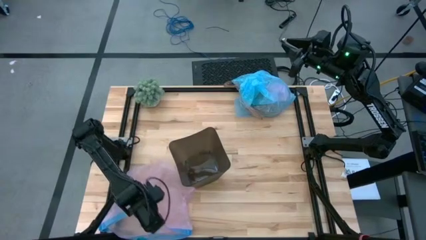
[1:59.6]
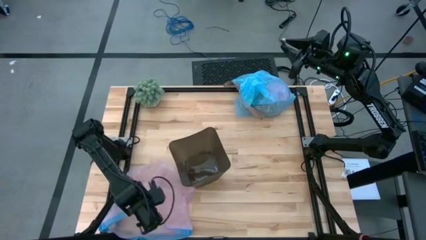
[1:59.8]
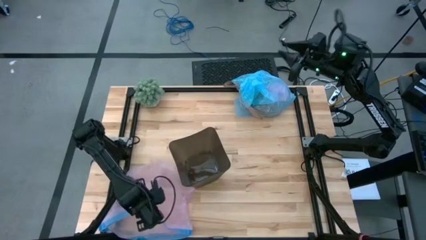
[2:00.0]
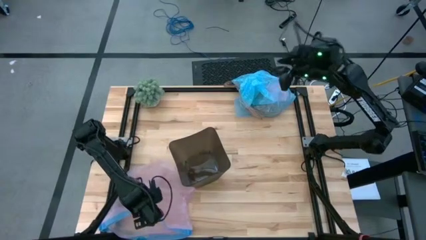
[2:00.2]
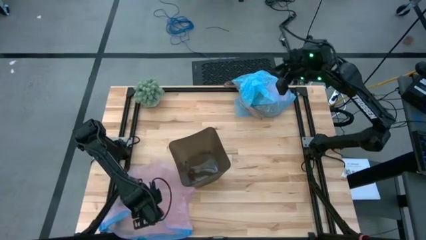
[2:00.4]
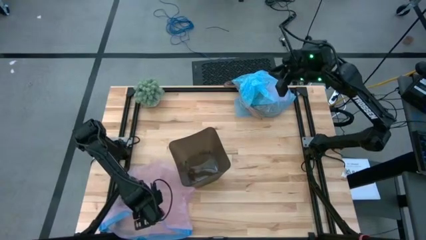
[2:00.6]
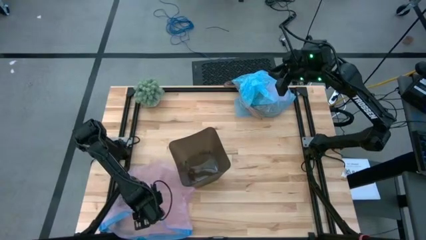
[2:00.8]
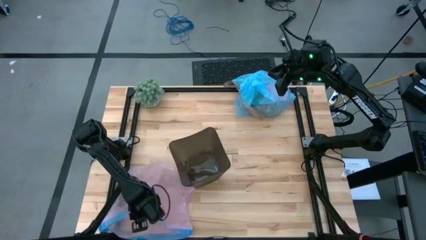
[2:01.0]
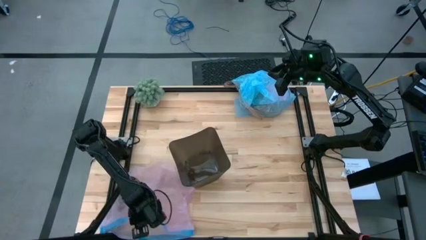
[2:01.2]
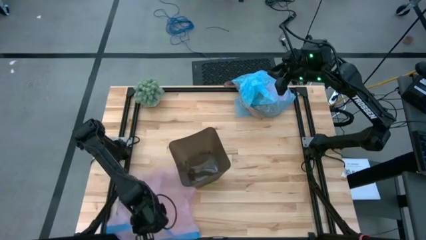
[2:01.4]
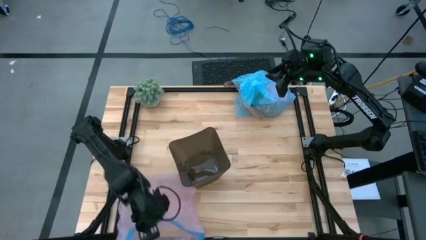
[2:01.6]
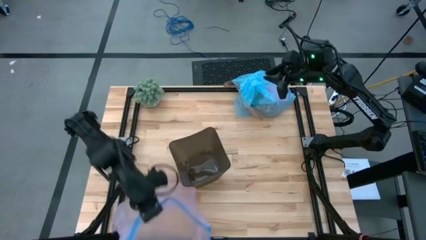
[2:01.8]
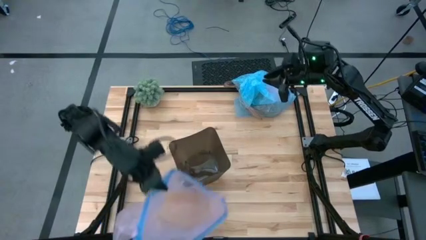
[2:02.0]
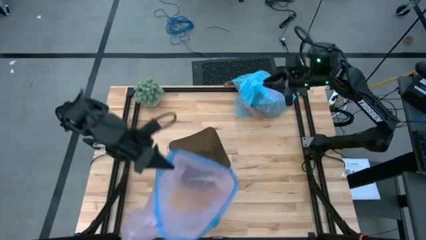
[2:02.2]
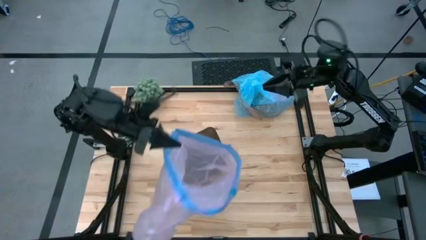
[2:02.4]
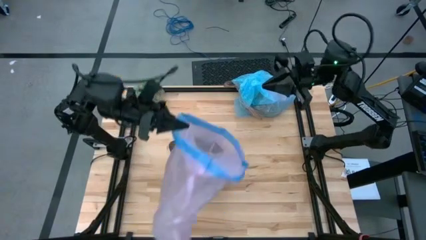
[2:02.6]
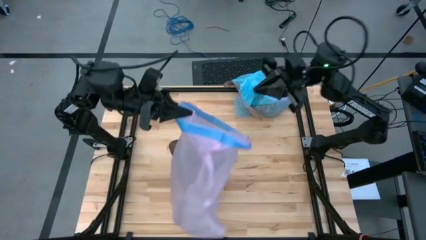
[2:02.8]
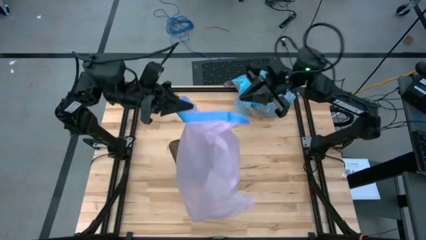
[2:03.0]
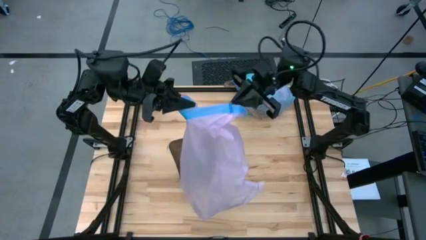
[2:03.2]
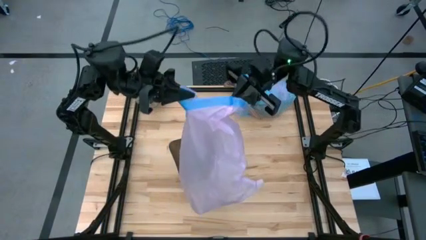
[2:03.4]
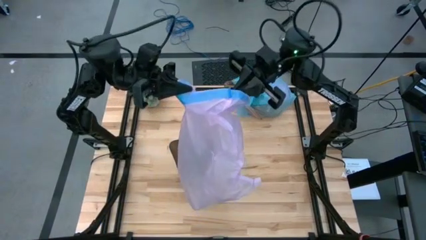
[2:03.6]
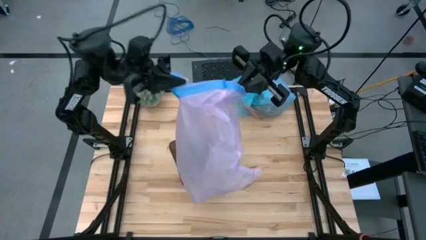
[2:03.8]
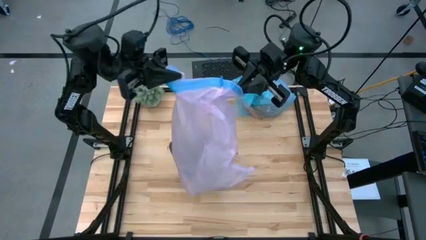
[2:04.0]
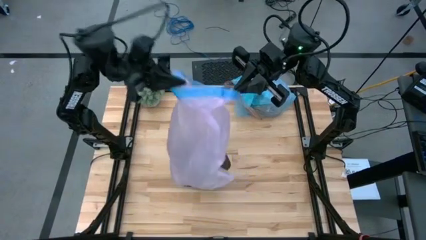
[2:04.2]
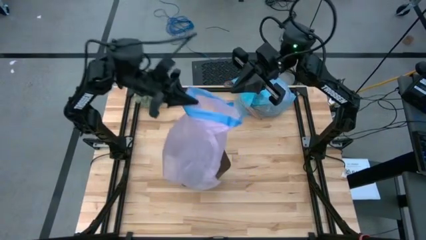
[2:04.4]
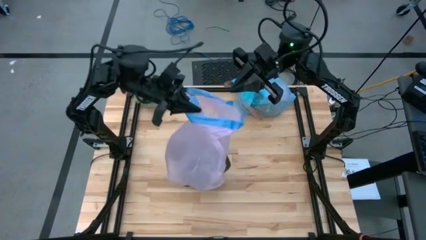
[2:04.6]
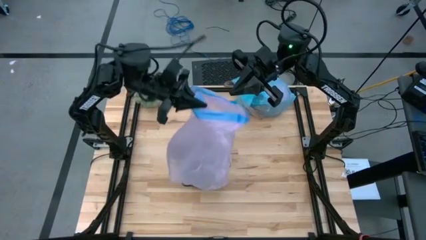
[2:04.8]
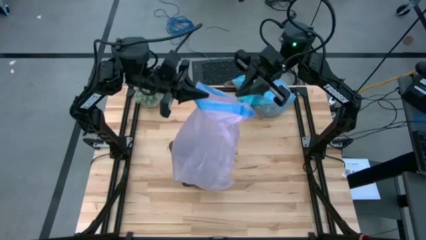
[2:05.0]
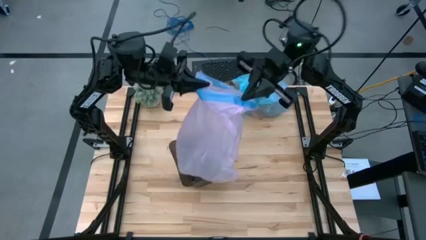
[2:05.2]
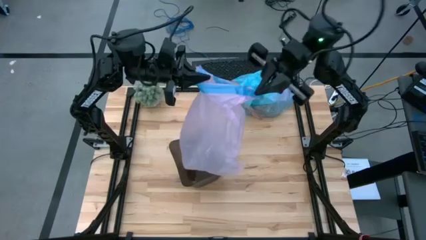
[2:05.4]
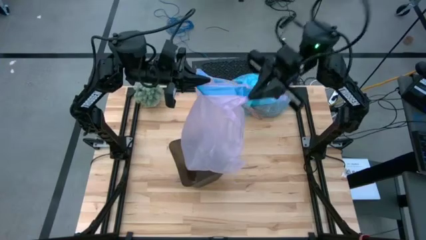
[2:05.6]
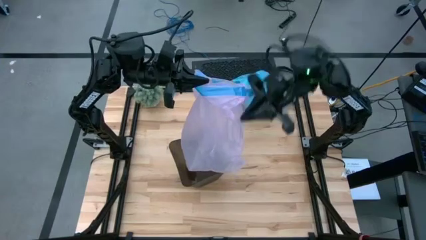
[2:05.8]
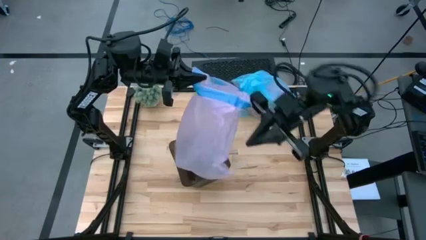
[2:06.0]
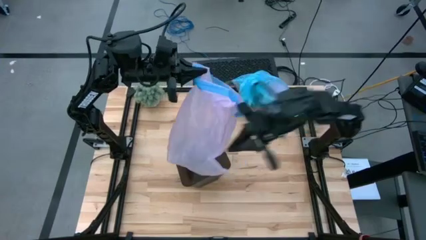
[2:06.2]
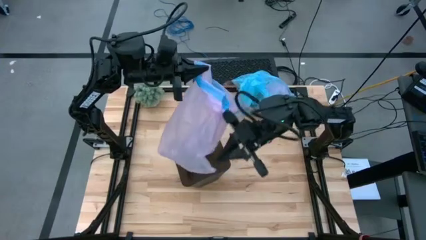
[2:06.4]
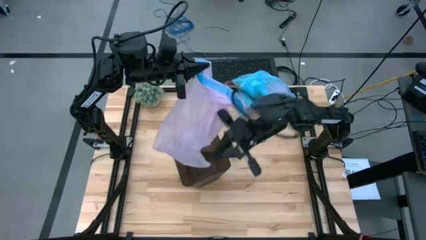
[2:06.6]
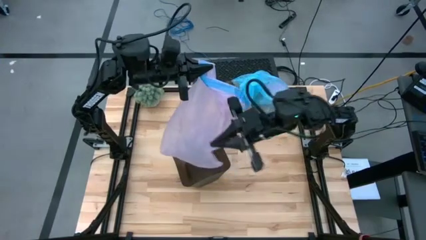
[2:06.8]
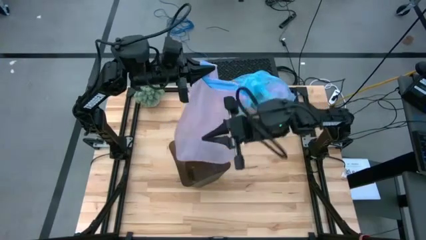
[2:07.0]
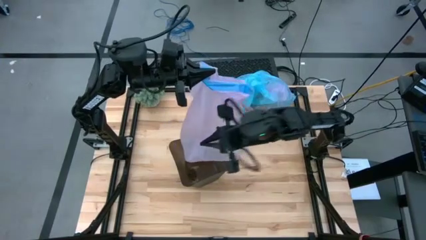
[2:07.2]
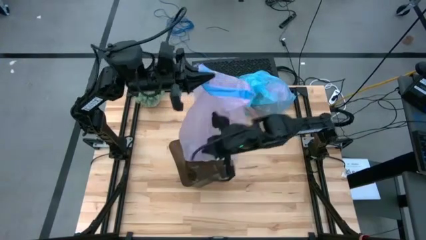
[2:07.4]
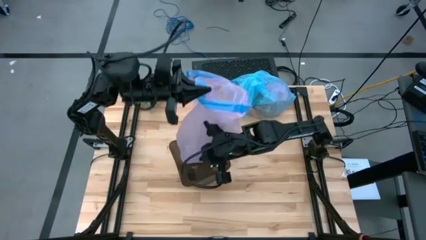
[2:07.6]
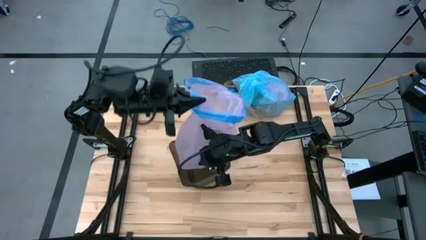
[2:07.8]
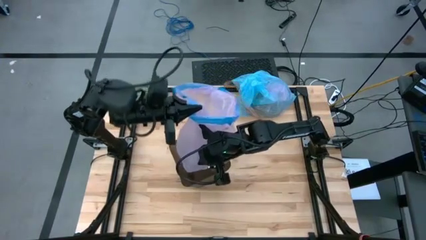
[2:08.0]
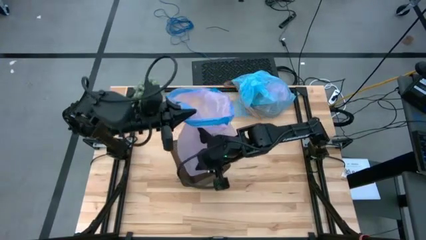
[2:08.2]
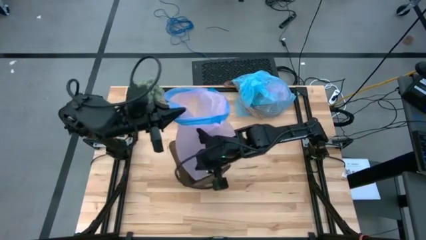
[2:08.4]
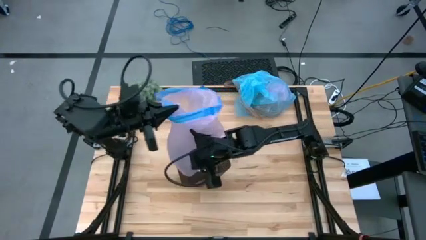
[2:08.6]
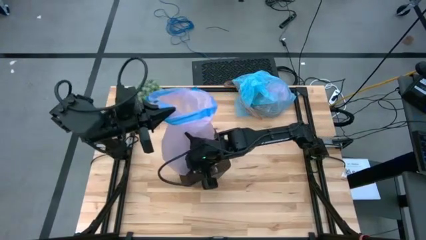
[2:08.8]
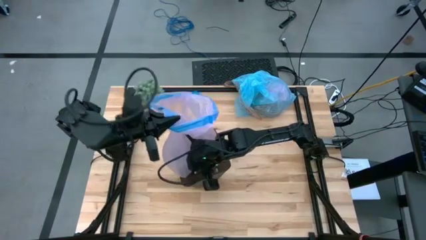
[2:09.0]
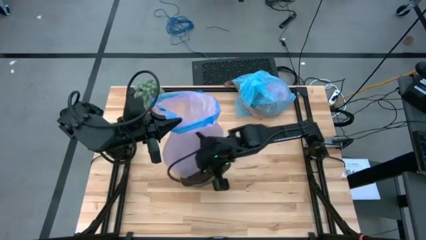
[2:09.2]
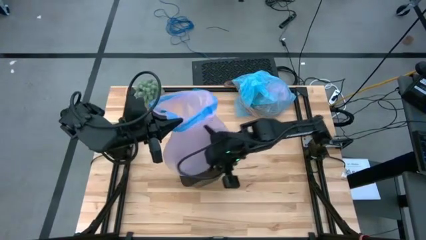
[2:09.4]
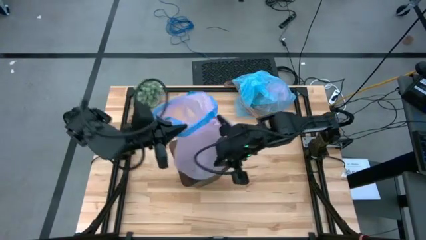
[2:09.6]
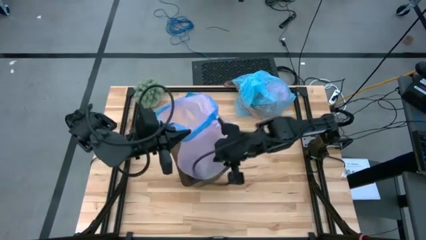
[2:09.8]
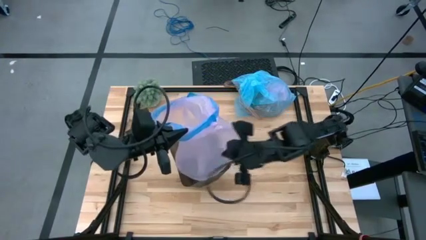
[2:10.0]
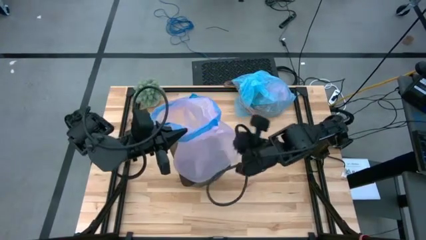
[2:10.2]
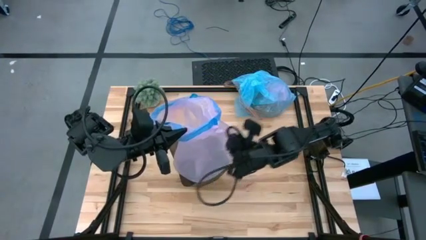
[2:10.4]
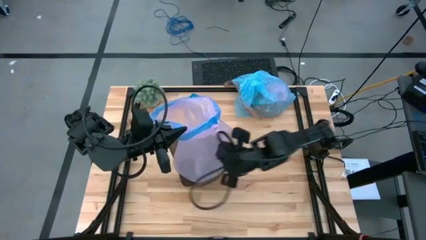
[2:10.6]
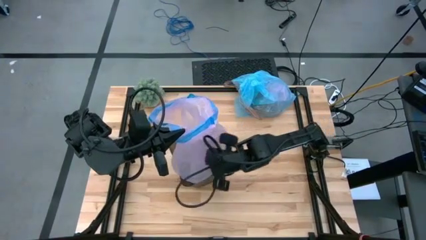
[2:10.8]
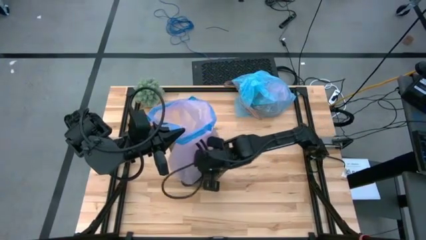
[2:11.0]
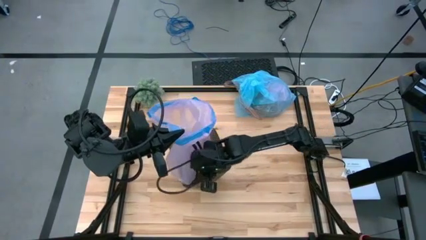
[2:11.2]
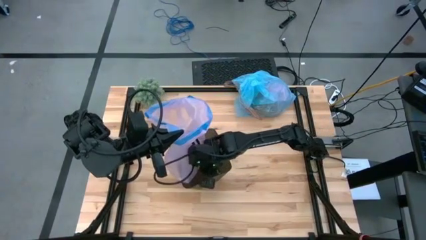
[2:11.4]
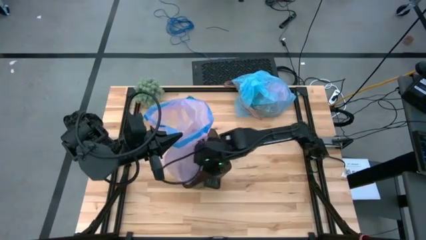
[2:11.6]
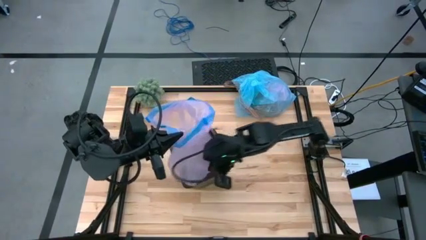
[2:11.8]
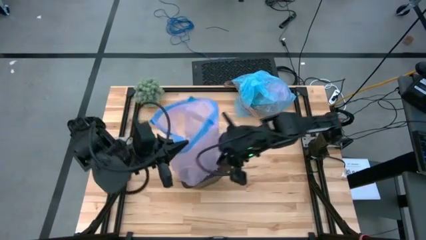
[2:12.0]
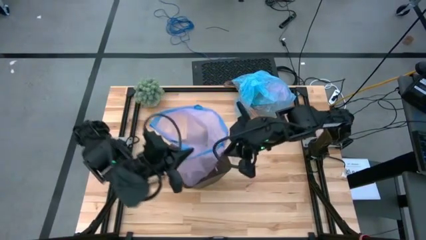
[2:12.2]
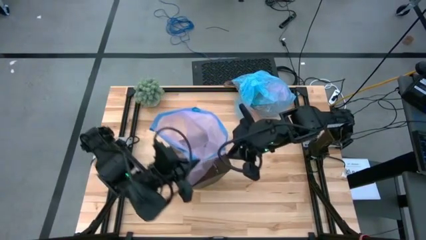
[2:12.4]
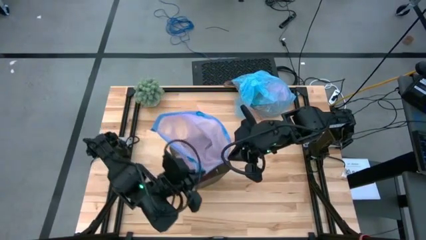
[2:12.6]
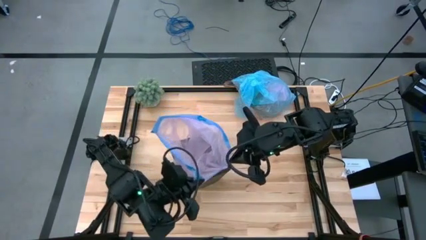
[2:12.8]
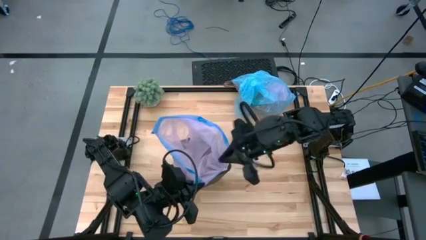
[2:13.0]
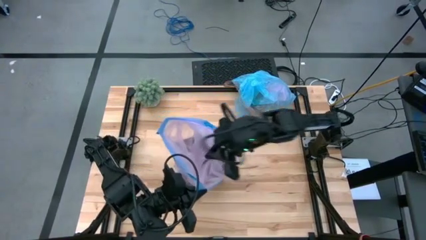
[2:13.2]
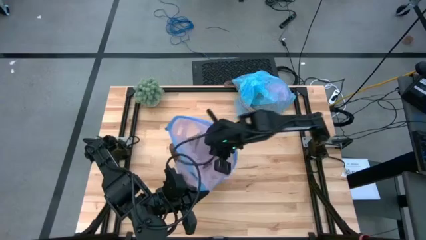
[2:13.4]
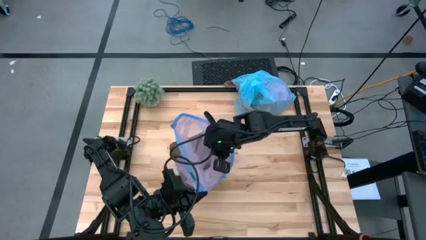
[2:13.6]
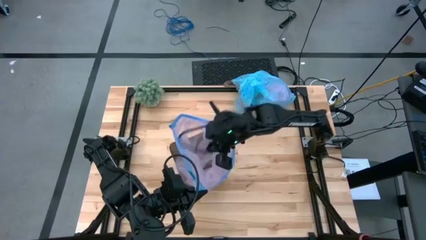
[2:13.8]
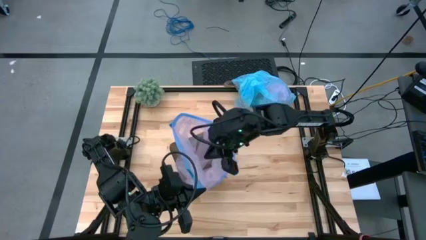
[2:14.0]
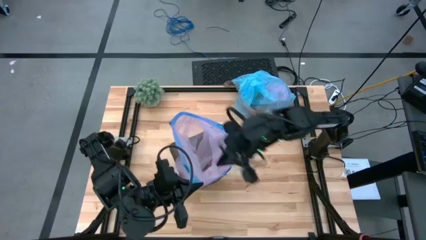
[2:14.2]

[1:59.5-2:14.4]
Task: place trash/remove bag and relplace
Insert the pink trash bag into the trash bin
